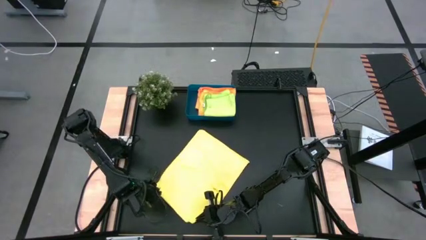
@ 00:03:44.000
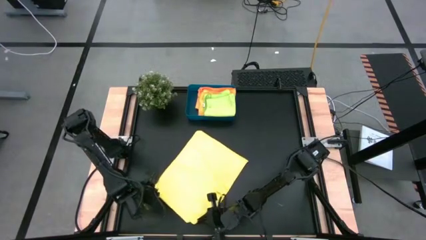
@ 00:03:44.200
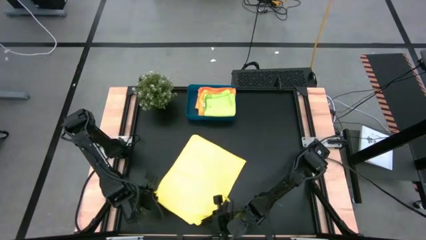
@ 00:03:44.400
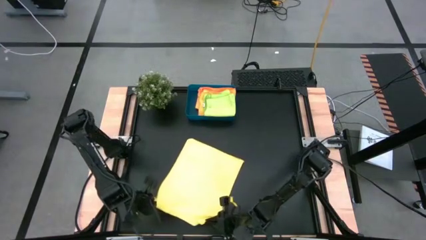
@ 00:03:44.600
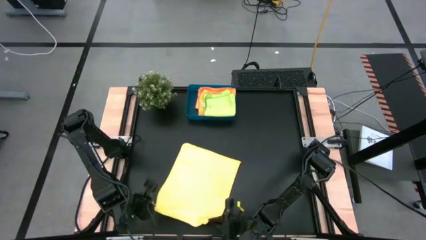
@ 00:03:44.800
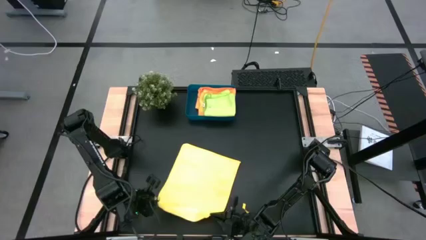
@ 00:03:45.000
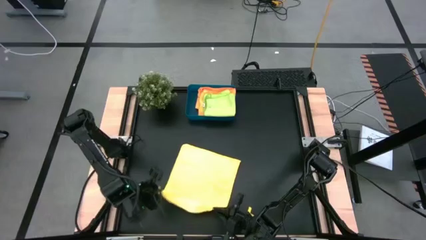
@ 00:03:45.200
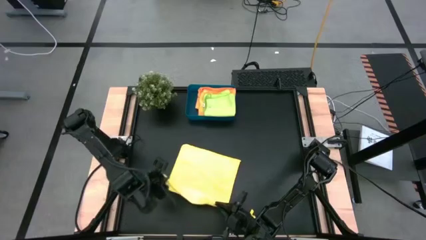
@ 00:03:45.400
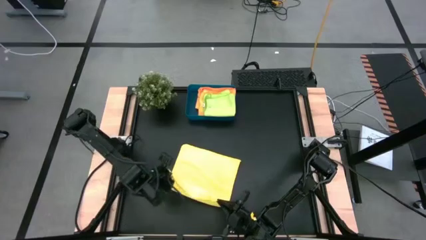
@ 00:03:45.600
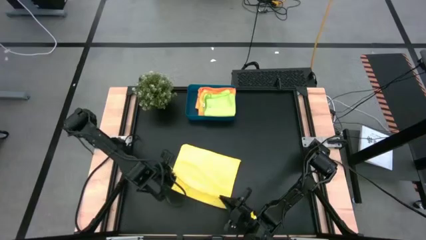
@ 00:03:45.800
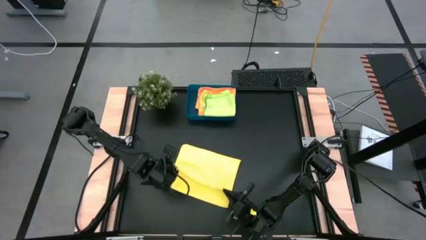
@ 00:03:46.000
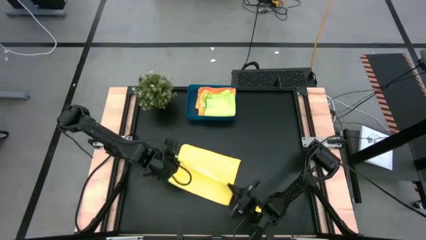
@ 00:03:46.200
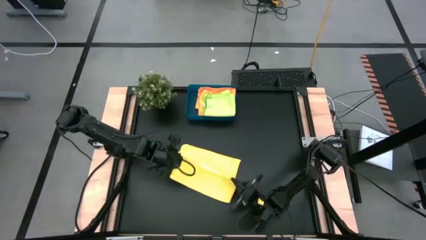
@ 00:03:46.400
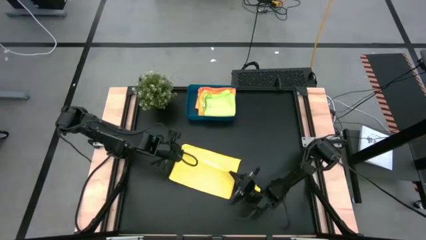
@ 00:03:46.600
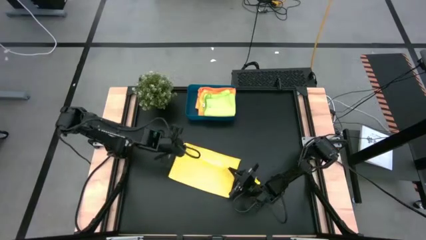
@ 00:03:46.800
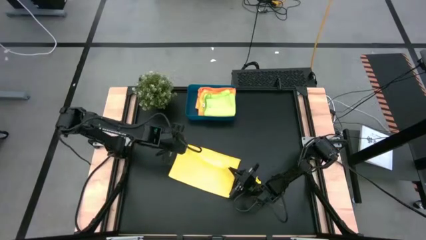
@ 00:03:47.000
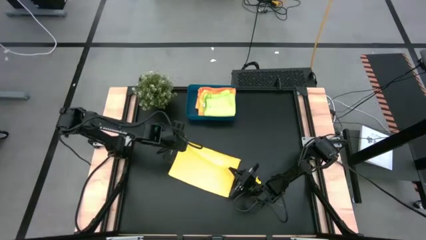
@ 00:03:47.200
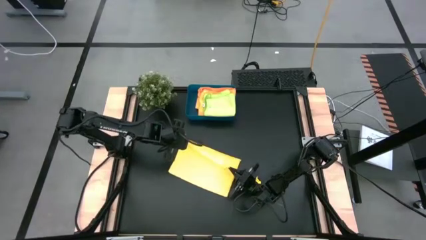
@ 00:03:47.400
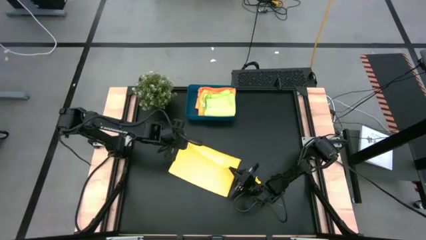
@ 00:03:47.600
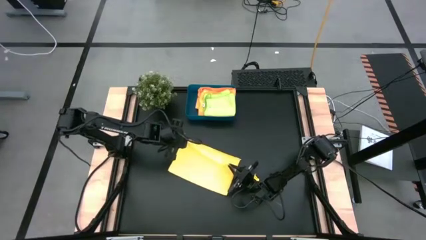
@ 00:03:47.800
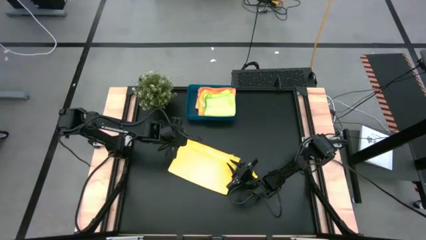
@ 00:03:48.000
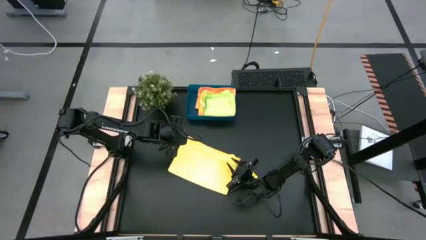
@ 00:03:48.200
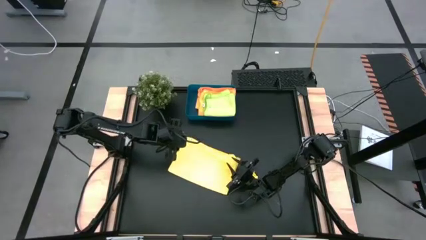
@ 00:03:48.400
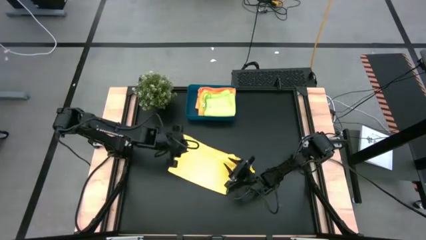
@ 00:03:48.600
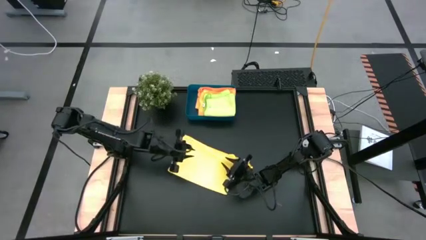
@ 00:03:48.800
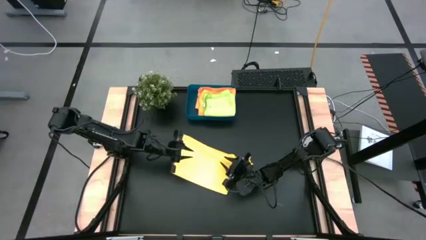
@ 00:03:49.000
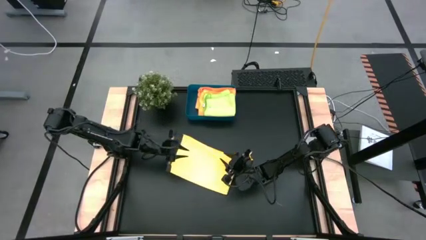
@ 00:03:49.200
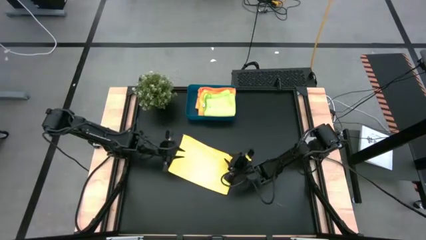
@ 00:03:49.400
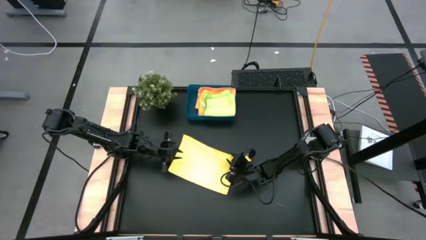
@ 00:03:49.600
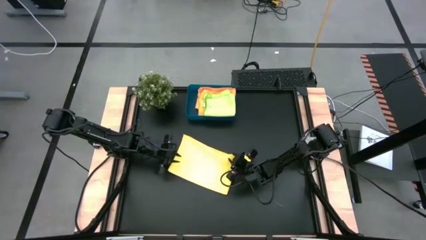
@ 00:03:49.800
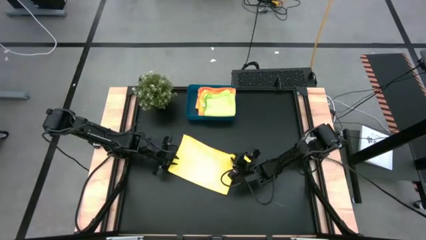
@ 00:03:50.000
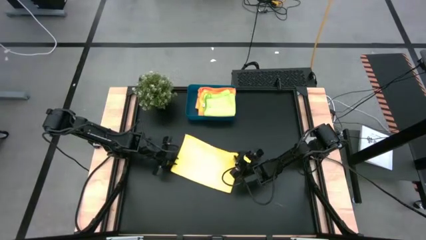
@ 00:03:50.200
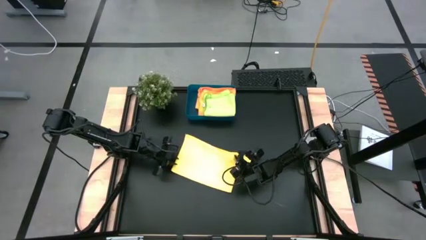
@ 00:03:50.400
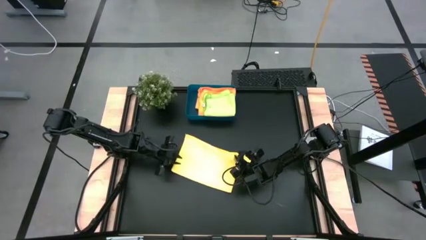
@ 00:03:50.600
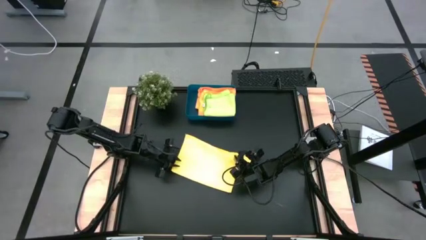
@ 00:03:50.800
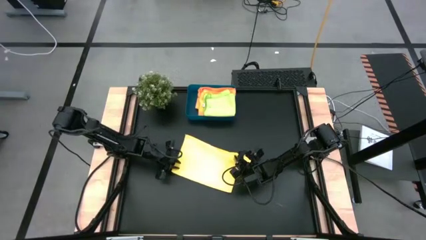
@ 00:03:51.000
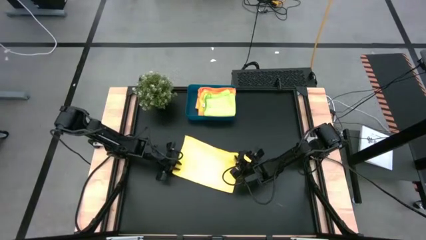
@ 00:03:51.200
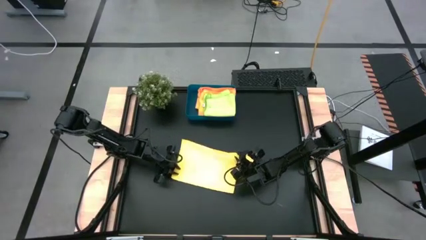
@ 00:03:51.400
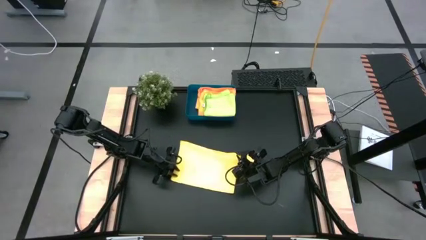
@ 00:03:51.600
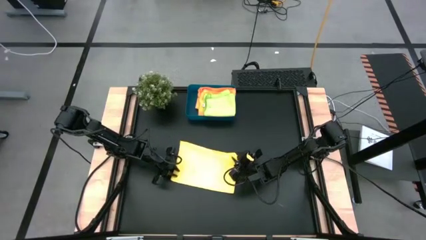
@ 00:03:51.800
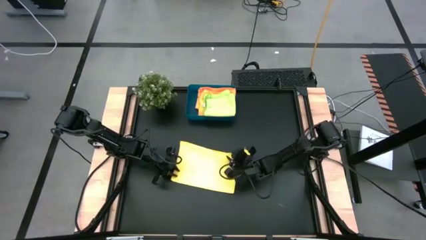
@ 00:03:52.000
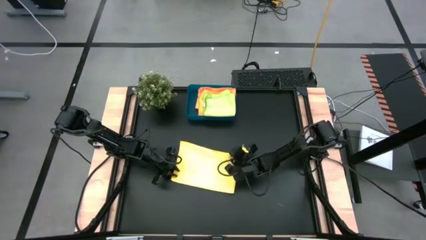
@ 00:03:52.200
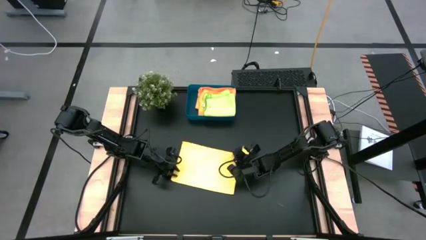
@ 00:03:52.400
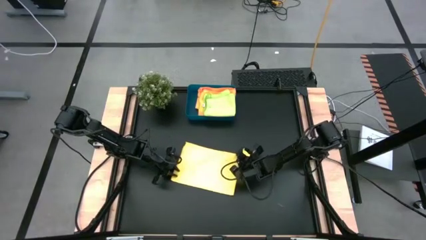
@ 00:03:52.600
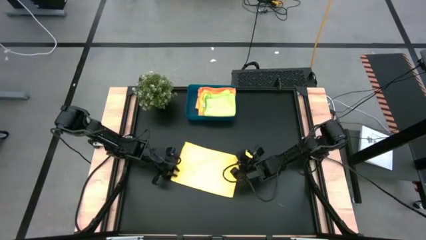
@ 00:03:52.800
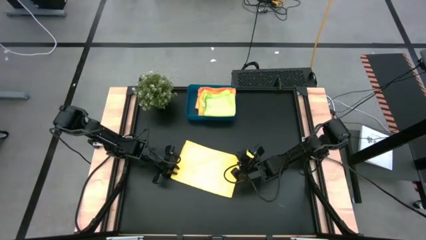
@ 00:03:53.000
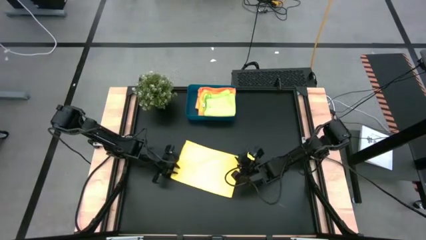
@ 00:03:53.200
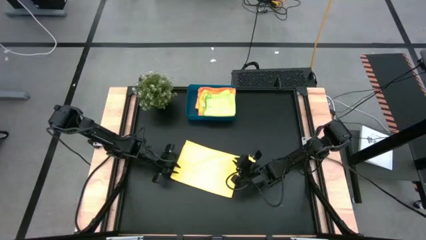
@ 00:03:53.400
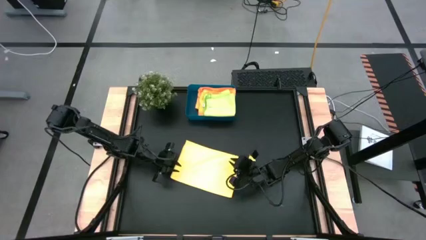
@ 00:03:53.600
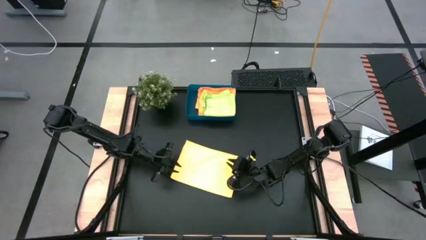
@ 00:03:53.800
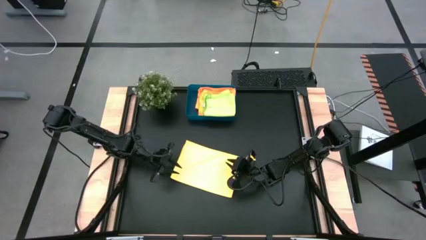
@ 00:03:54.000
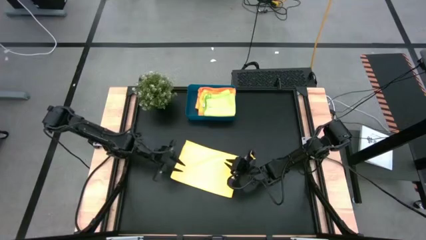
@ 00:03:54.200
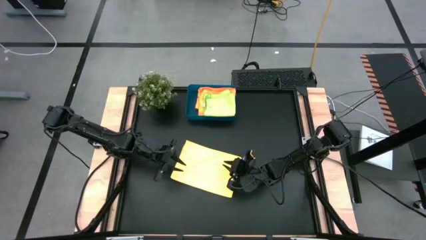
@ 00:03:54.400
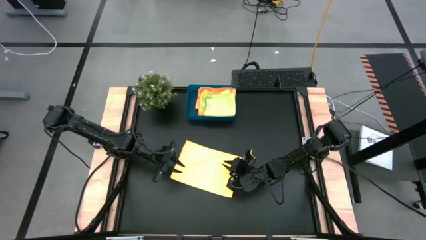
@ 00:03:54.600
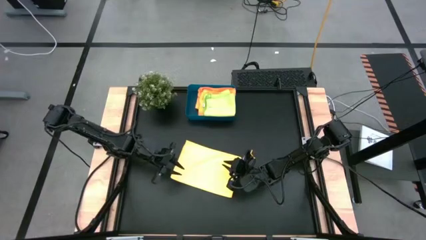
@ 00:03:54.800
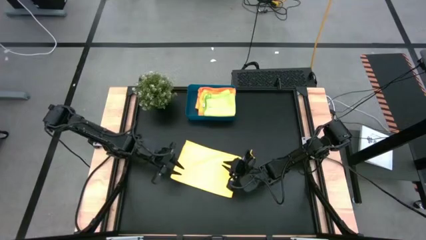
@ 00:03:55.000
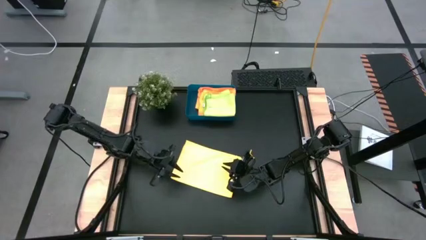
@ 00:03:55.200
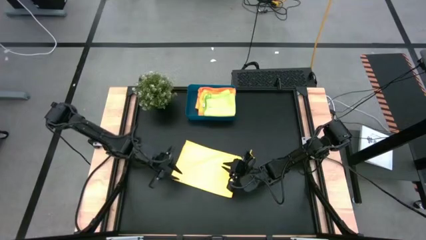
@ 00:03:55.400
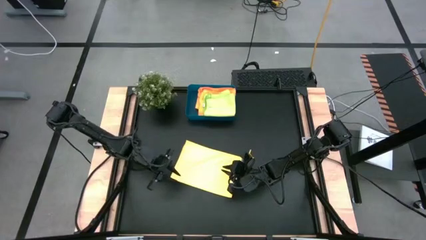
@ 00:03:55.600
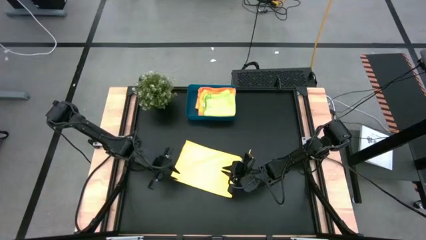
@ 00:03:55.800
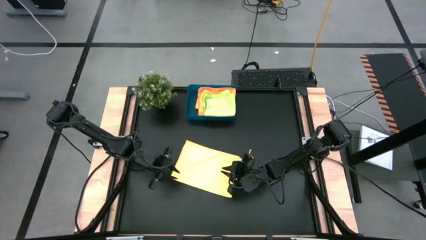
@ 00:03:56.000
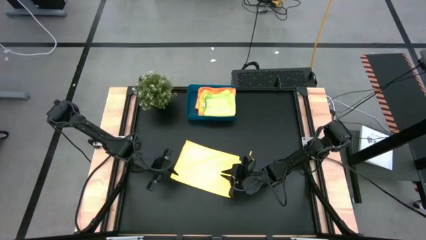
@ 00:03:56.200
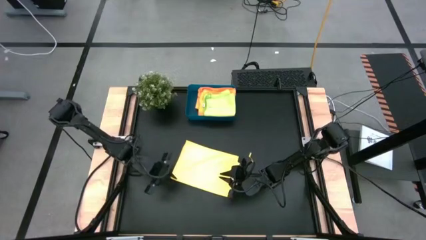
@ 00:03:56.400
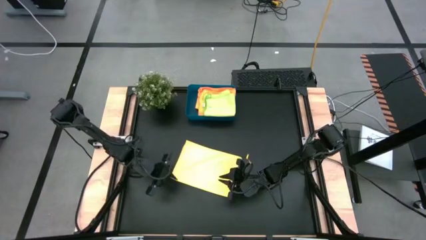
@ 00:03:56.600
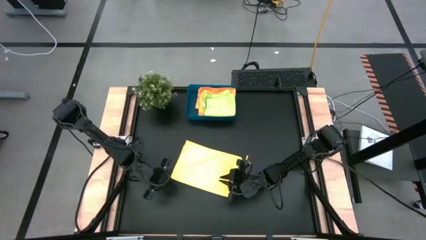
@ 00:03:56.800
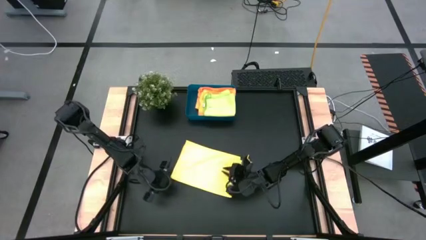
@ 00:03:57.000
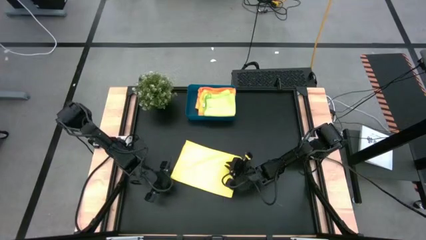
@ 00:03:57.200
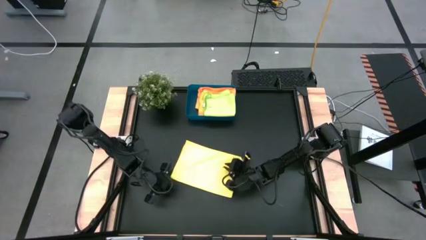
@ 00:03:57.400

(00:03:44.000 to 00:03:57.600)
Task: Fold microfiber towels
Fold the yellow microfiber towel

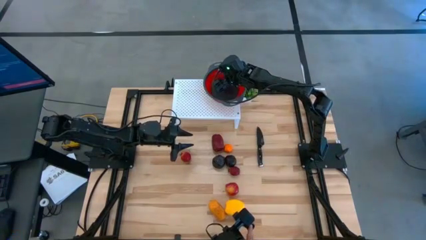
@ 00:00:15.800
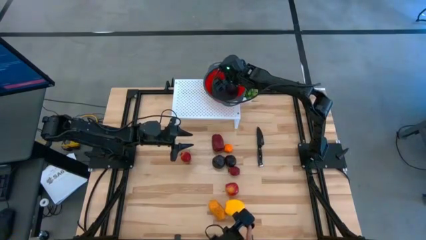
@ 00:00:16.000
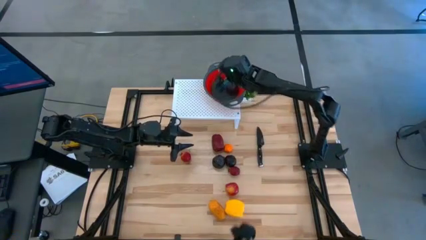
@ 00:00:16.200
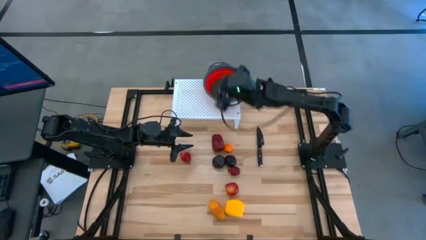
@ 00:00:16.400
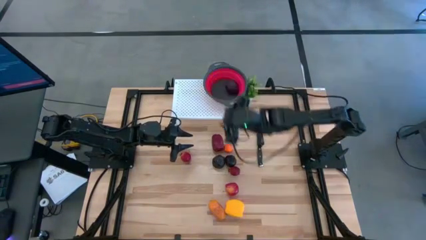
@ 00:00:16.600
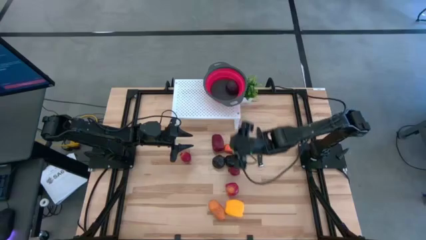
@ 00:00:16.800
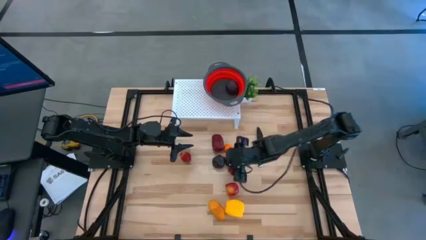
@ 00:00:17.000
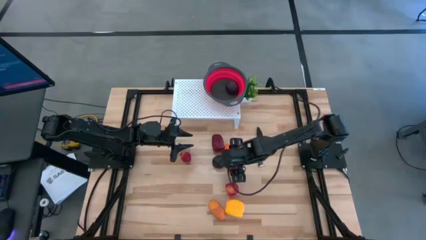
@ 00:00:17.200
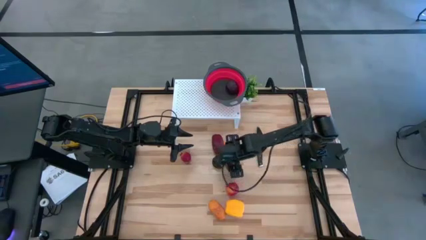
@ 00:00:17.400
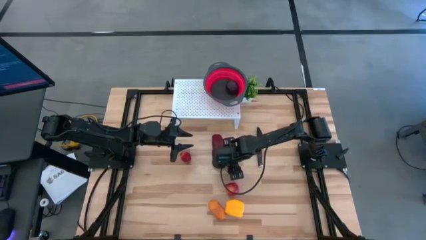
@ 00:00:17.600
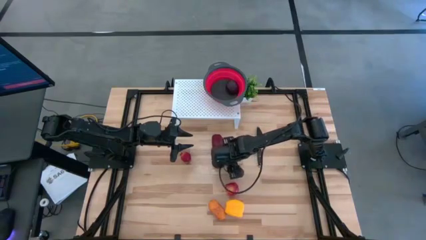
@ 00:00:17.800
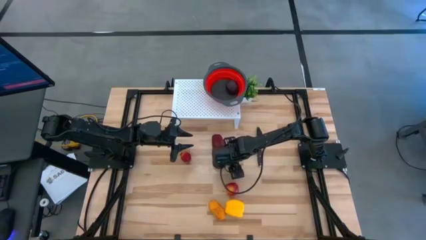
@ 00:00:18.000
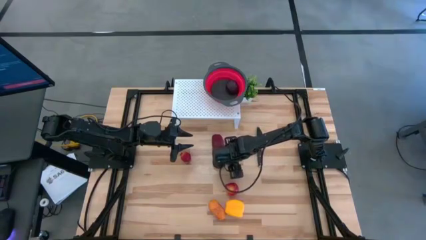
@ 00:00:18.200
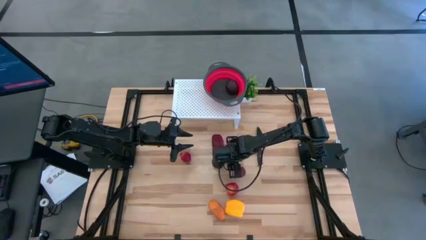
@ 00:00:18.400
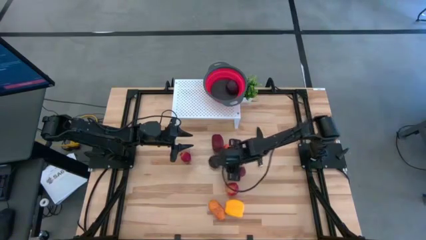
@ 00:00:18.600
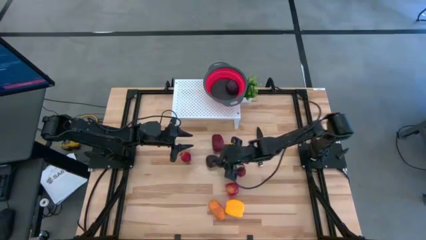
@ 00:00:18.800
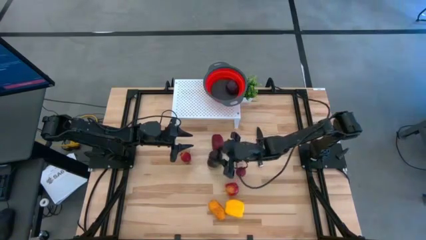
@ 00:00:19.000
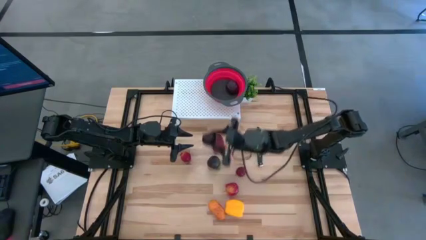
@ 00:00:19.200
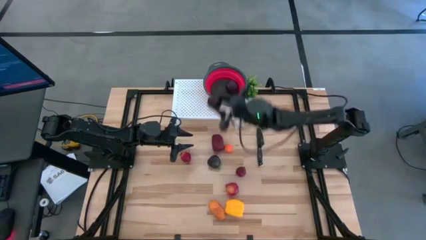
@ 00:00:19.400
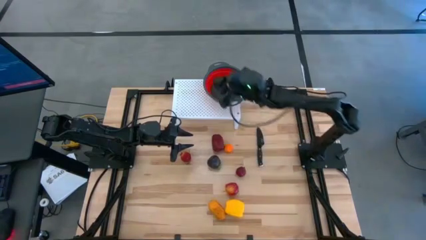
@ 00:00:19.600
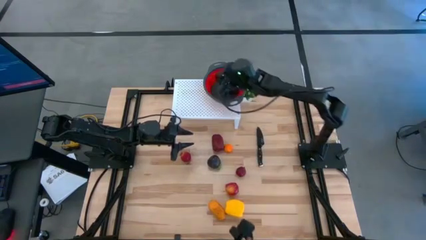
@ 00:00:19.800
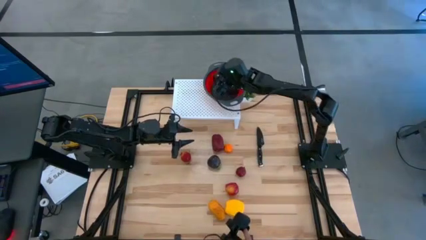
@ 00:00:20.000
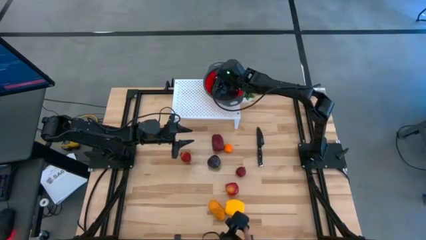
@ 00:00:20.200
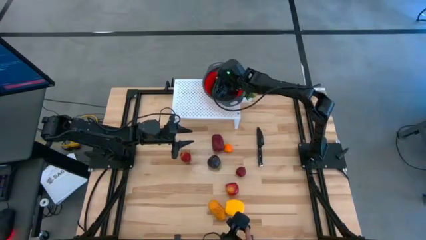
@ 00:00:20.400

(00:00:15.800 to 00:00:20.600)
Task: Pick & Place Fruit
Put the purple plum into the red strainer bowl
